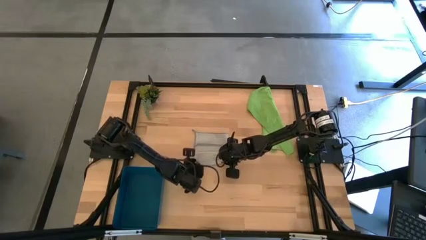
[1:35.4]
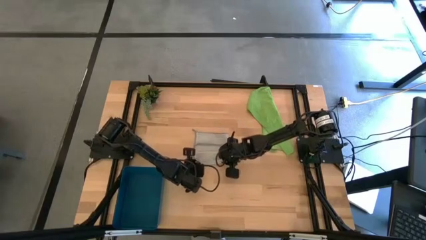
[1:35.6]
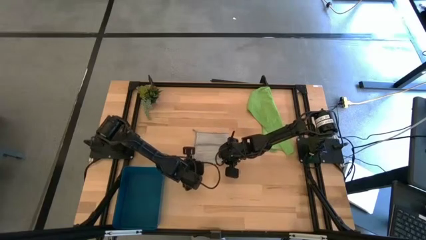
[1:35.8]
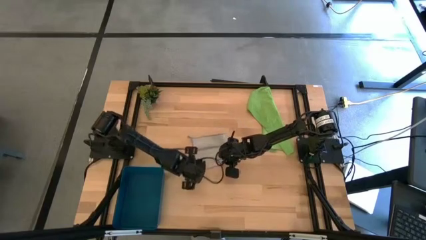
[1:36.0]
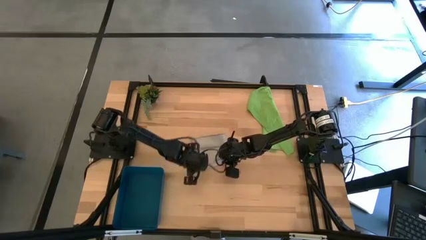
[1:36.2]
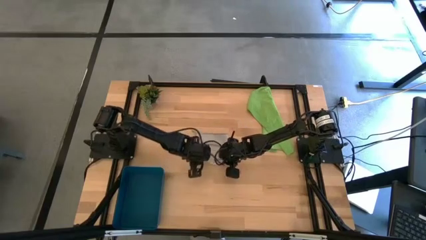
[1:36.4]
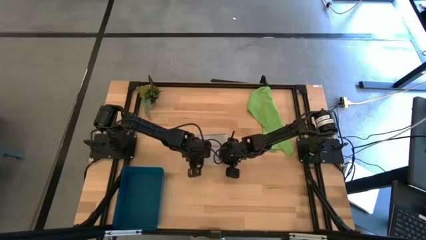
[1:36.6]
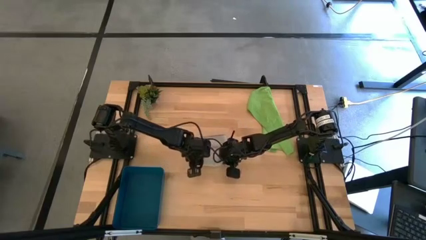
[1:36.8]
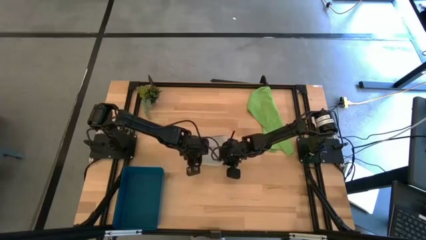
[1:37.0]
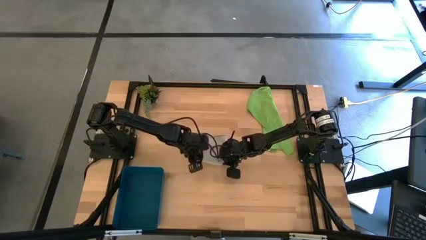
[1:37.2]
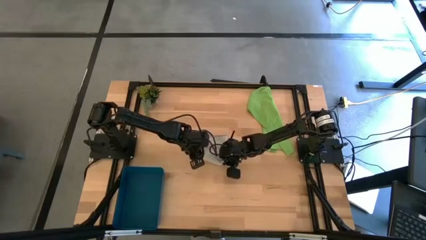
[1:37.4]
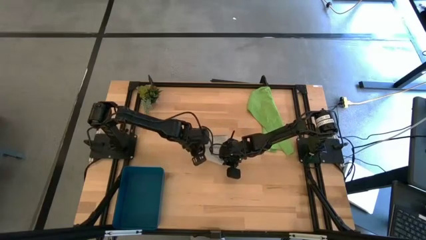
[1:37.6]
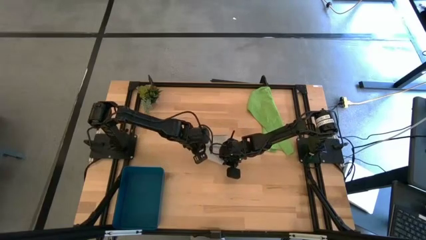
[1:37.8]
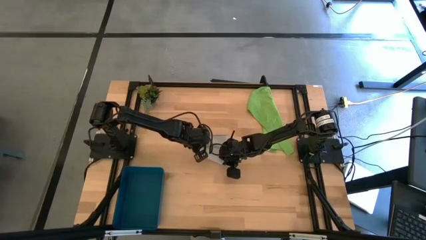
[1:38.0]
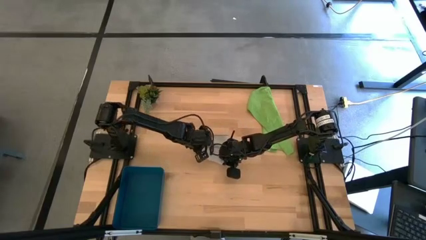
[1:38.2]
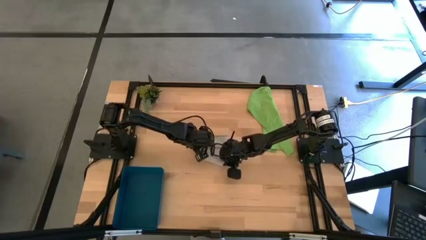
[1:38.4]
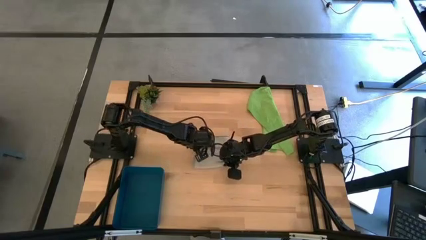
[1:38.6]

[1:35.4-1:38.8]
Task: Roll microfiber towels into tight, uniform cylinder then place into a basket
Roll the gray towel

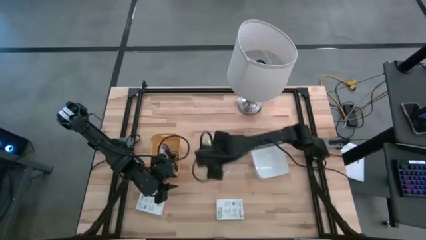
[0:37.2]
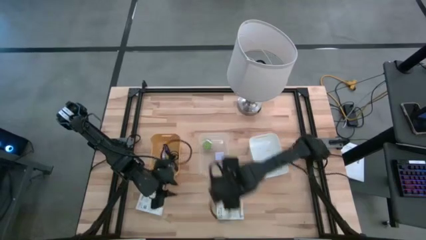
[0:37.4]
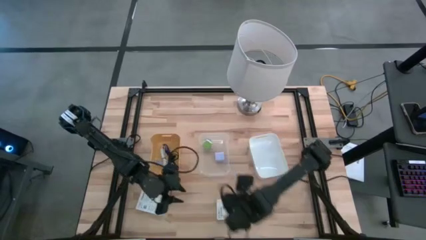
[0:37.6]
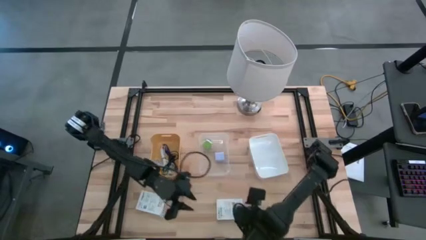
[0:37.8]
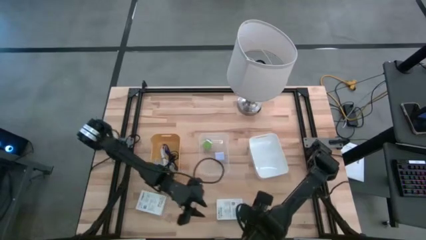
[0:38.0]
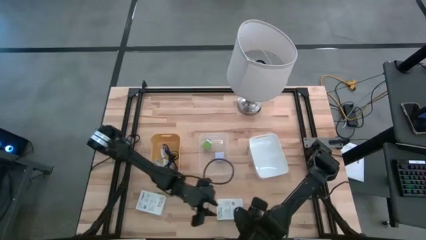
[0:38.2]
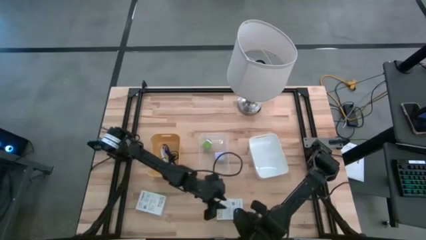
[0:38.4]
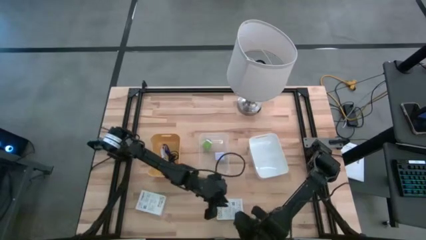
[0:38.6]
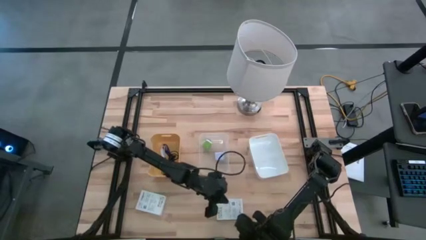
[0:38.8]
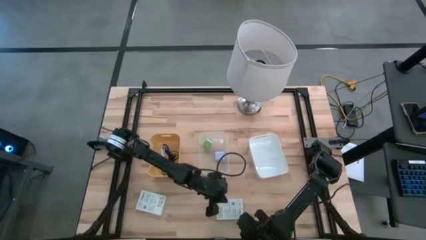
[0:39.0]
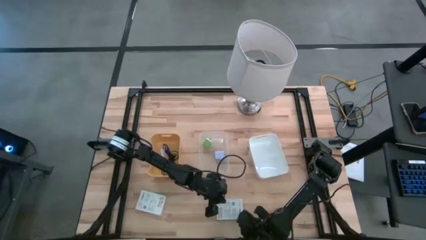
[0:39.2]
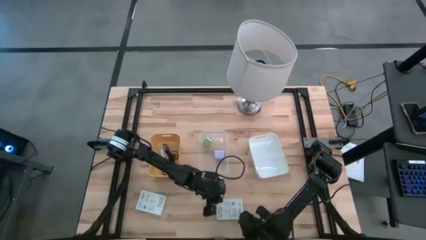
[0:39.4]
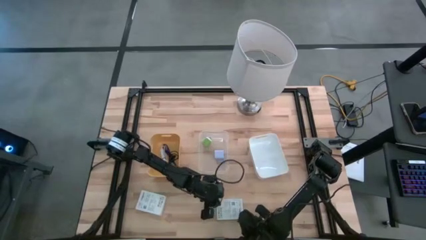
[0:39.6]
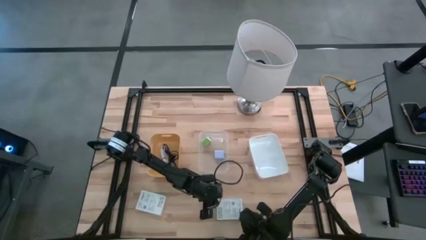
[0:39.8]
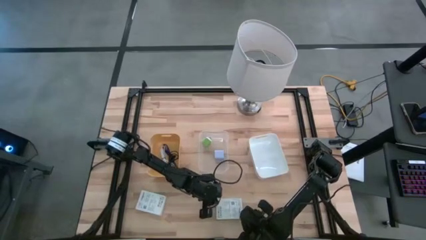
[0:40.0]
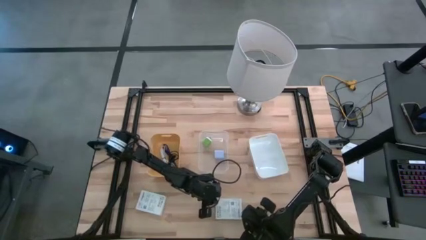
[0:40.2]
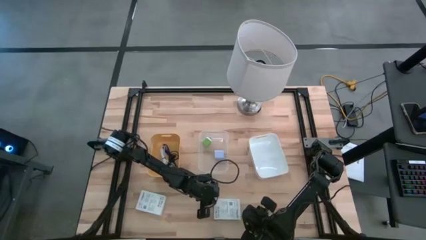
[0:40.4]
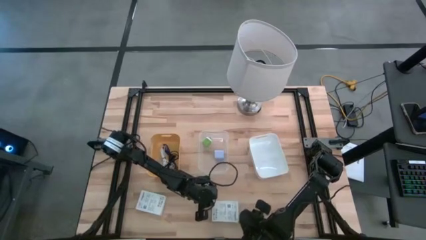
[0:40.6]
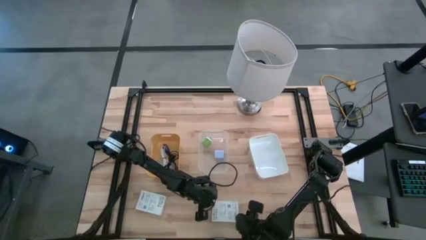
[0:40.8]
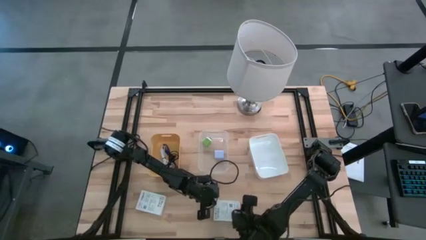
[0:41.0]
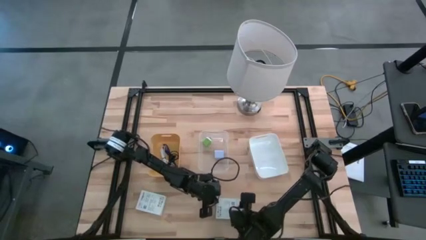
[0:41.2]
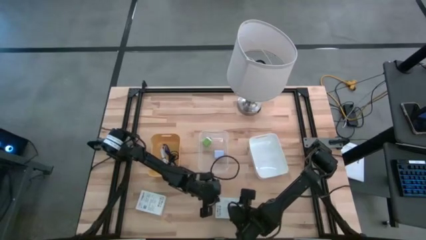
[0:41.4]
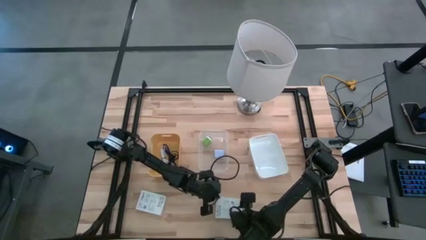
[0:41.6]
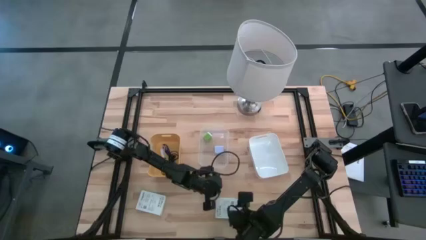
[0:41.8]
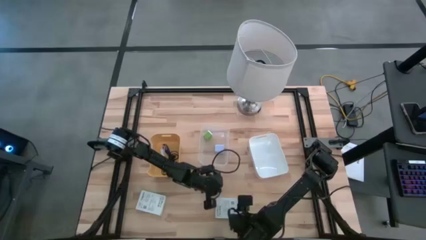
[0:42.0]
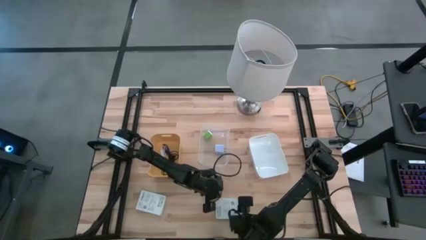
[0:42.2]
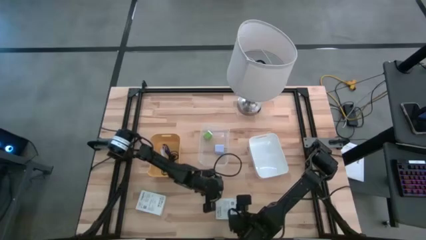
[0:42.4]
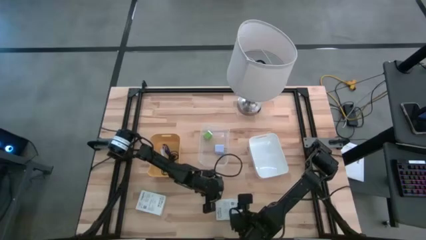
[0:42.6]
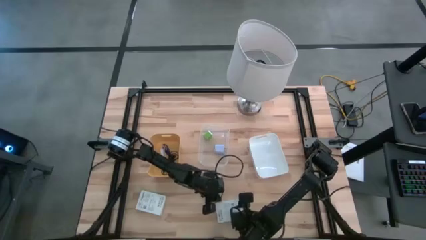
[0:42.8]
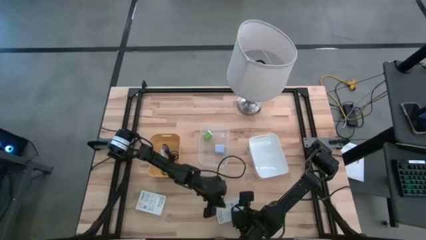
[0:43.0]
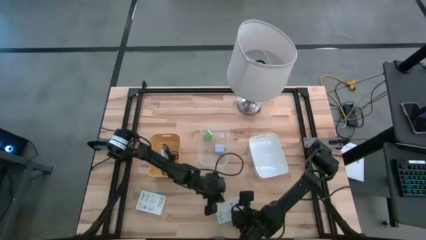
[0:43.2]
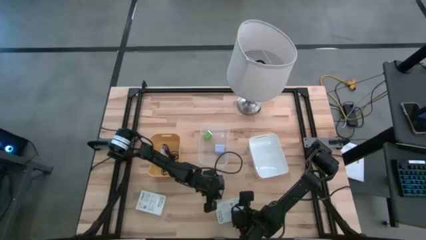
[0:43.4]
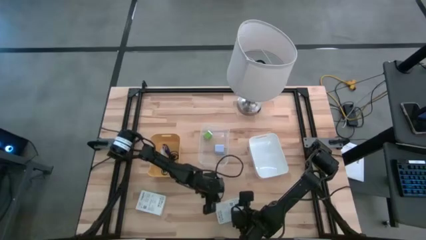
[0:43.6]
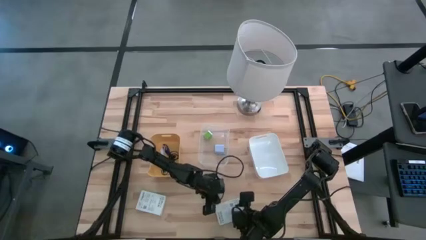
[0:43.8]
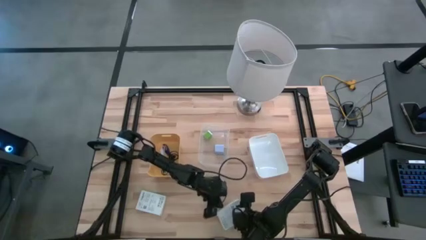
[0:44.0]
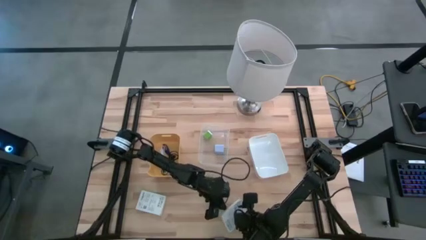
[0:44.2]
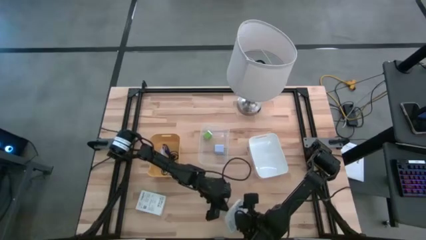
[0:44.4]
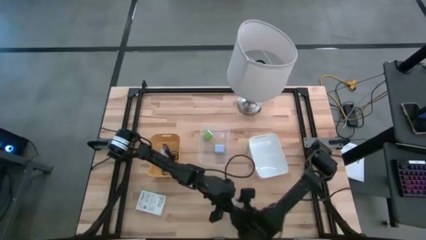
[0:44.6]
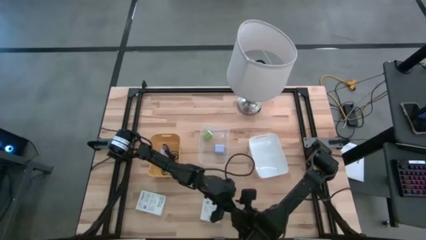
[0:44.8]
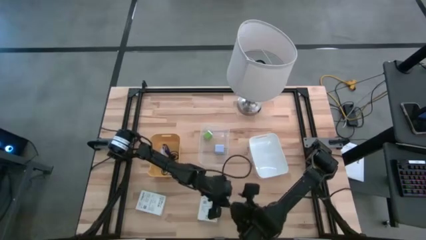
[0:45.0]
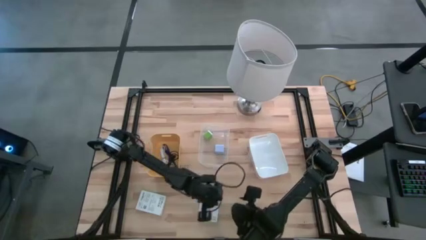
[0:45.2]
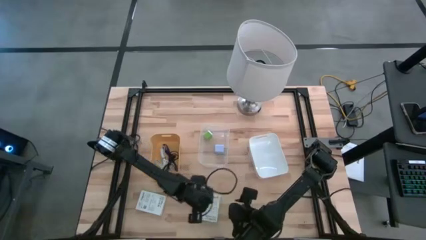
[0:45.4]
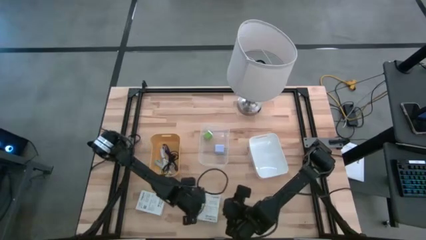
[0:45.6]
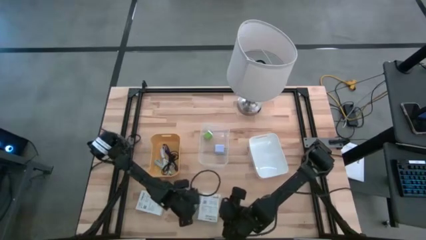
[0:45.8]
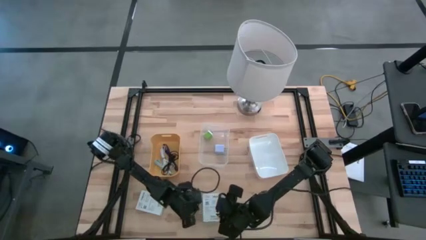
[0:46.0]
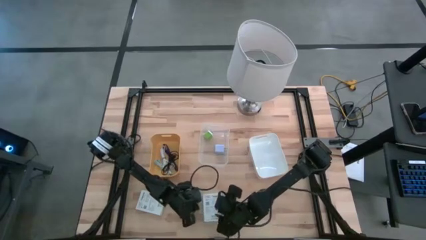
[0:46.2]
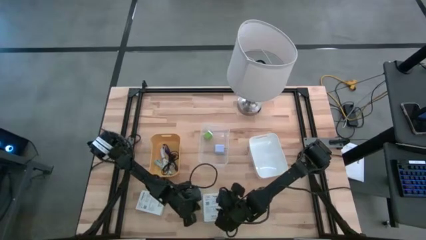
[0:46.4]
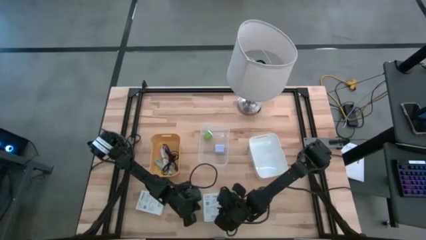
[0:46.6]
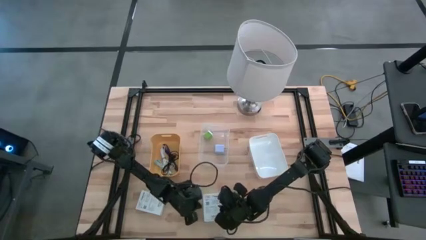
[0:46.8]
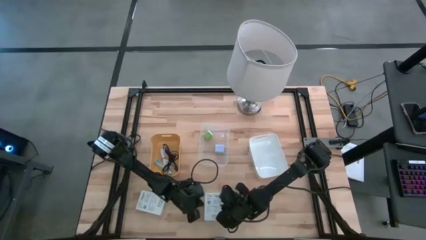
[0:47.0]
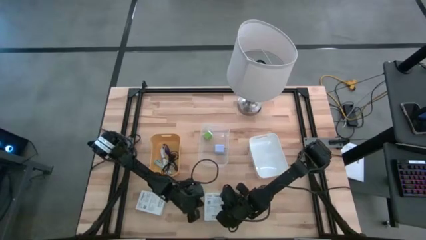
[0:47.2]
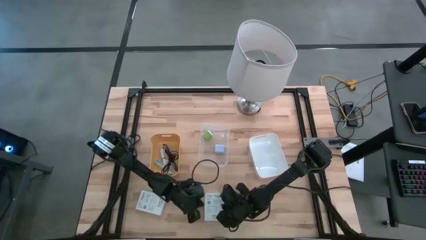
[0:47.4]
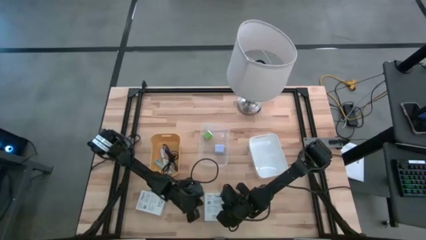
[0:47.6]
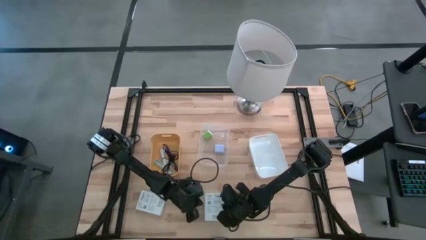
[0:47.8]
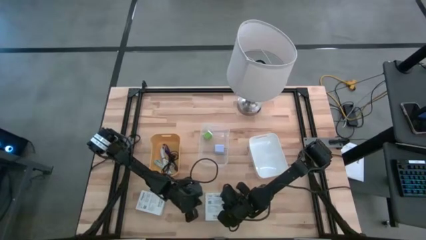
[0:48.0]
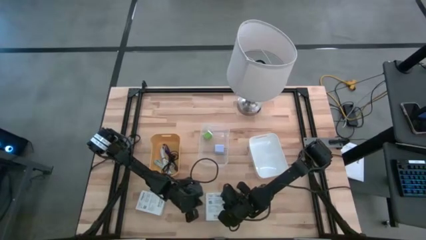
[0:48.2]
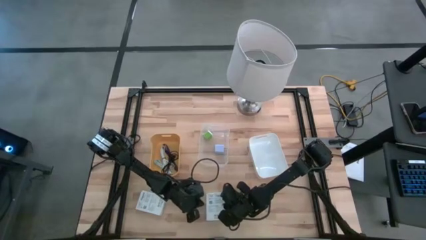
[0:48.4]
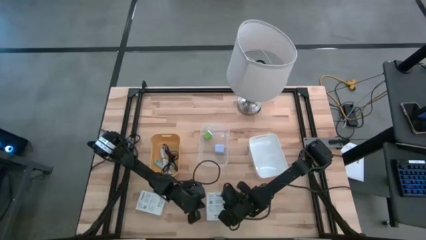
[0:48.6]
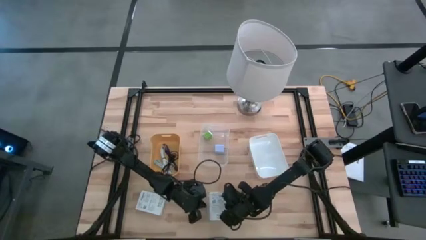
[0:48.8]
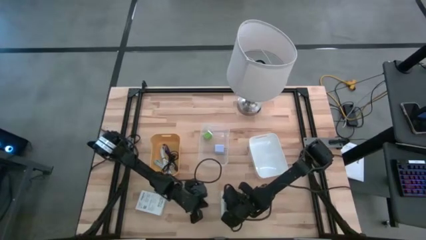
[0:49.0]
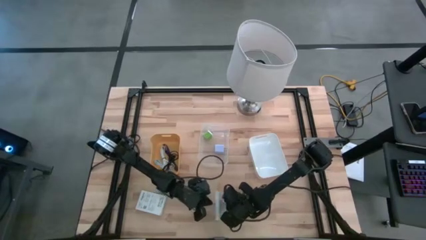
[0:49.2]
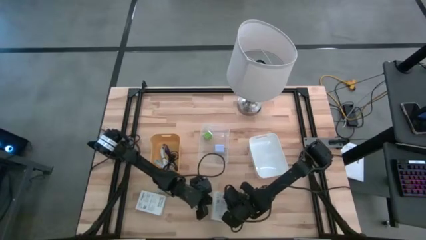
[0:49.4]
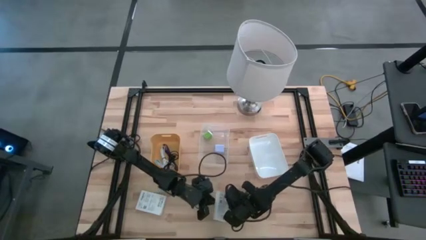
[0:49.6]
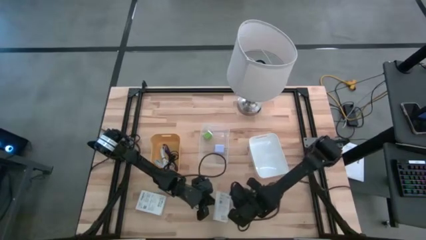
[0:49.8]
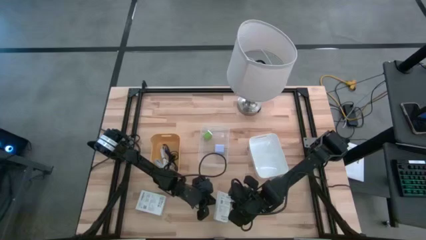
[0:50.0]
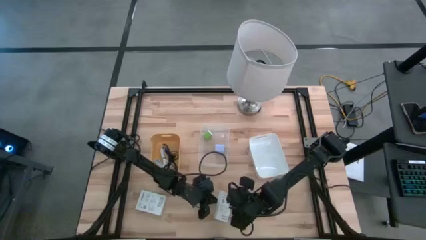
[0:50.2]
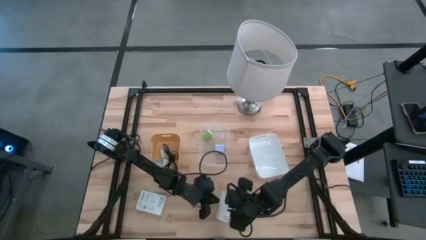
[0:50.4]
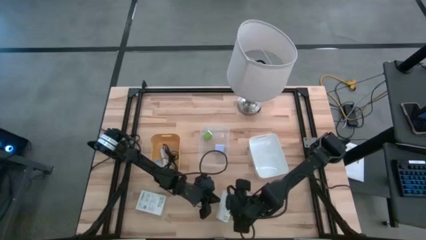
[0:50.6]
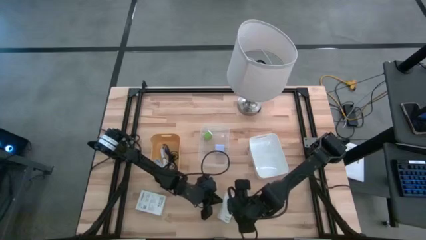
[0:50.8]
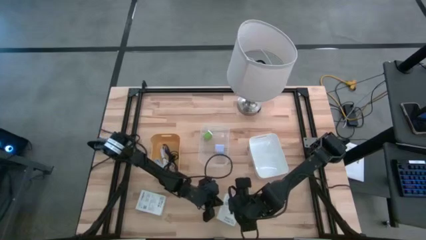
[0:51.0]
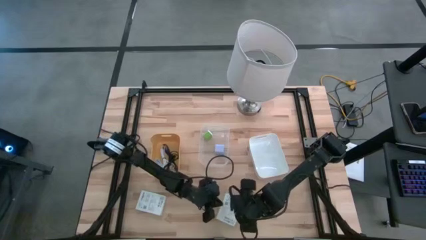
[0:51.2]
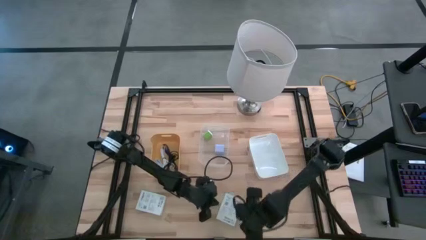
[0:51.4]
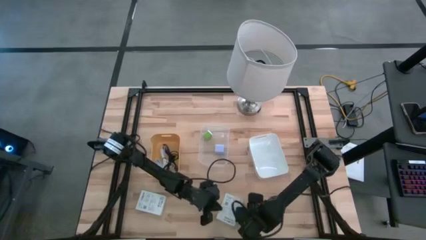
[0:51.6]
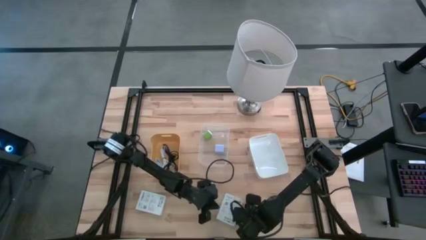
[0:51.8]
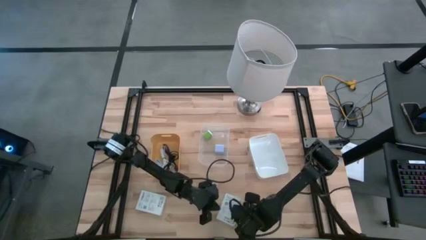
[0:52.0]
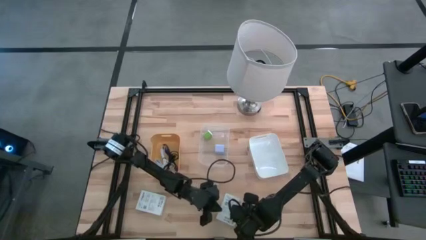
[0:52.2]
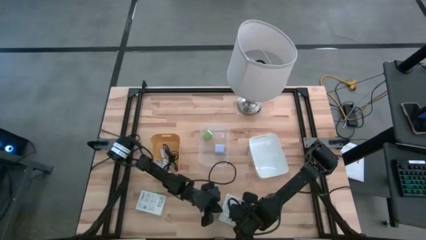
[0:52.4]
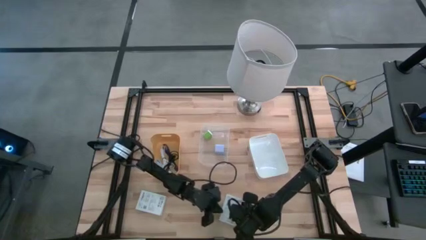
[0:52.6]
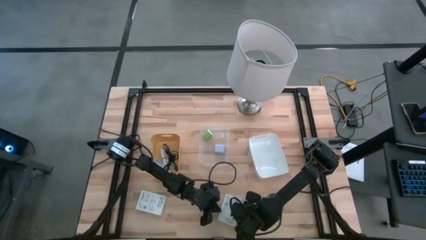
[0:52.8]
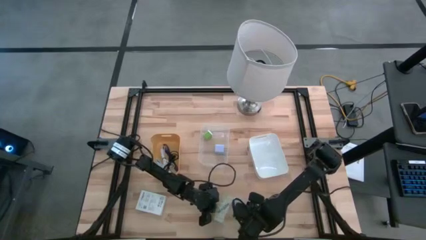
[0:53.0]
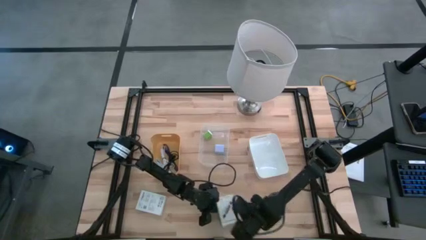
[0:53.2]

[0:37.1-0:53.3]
Task: Pick and place items into bin
Put the white card reader box into the white bin
